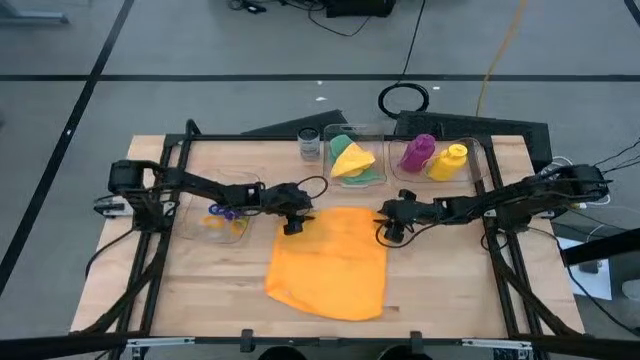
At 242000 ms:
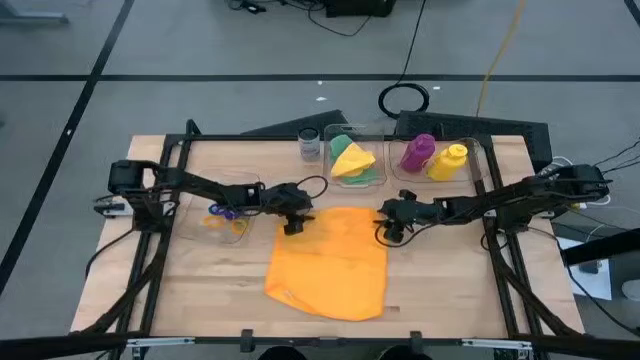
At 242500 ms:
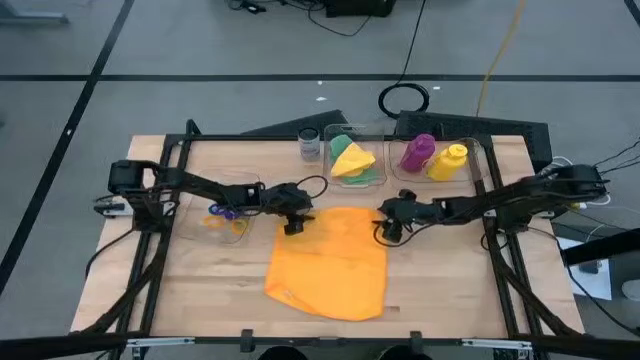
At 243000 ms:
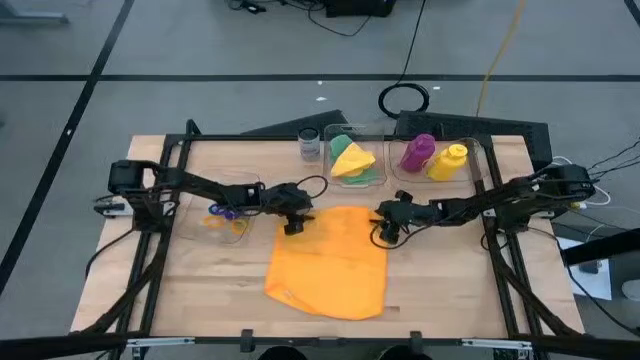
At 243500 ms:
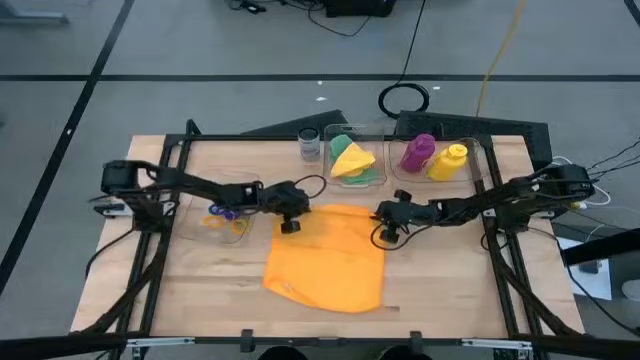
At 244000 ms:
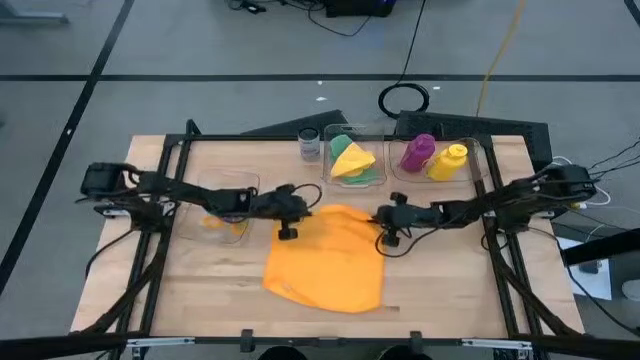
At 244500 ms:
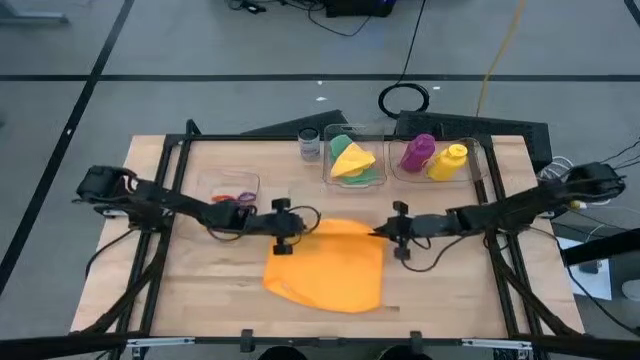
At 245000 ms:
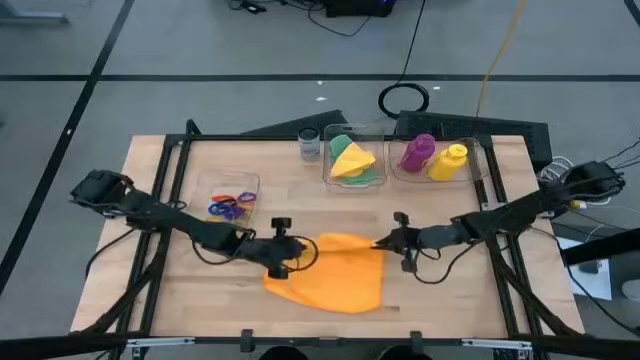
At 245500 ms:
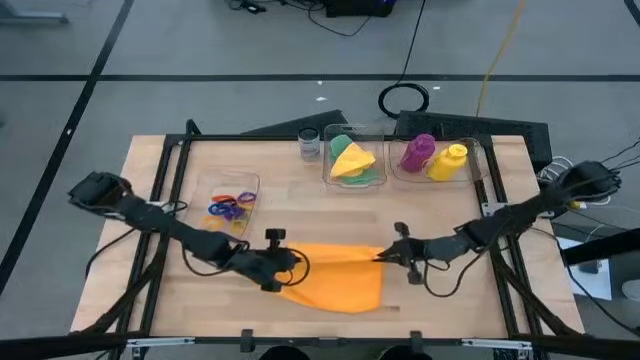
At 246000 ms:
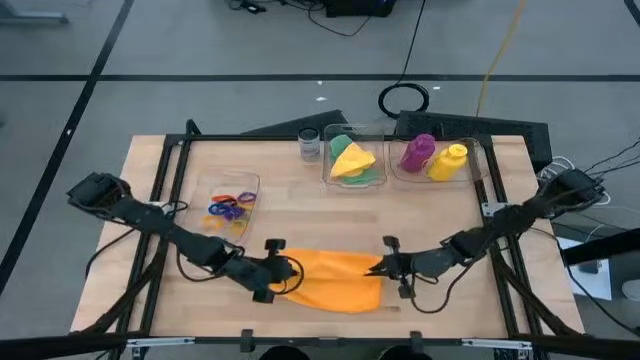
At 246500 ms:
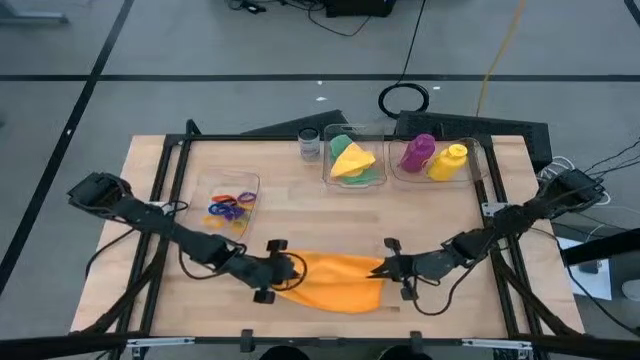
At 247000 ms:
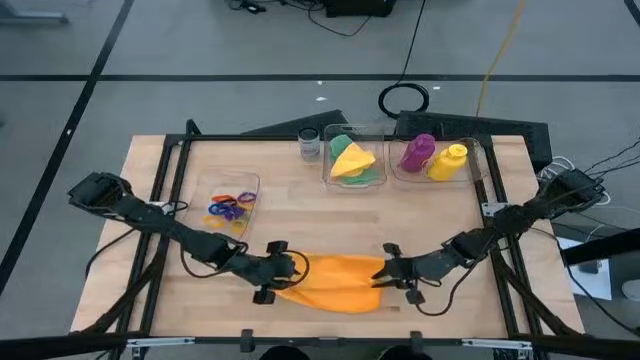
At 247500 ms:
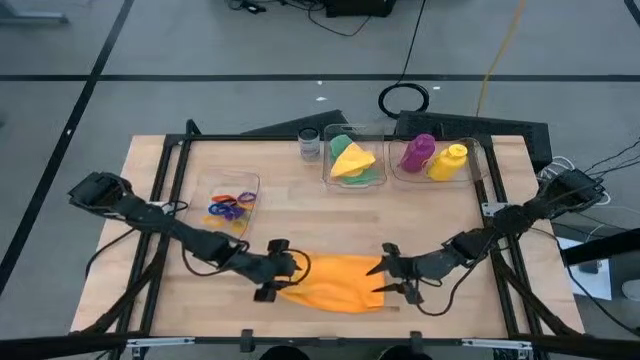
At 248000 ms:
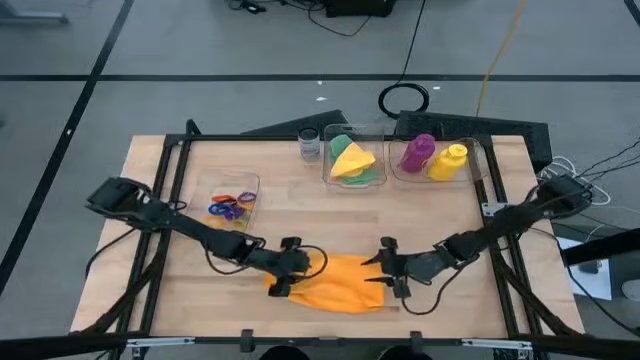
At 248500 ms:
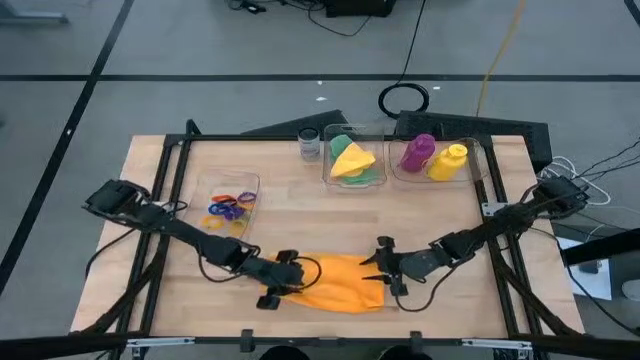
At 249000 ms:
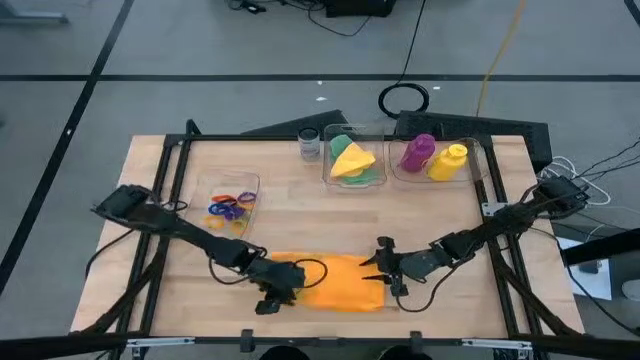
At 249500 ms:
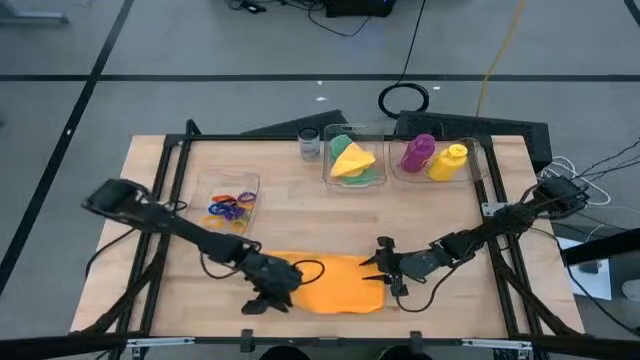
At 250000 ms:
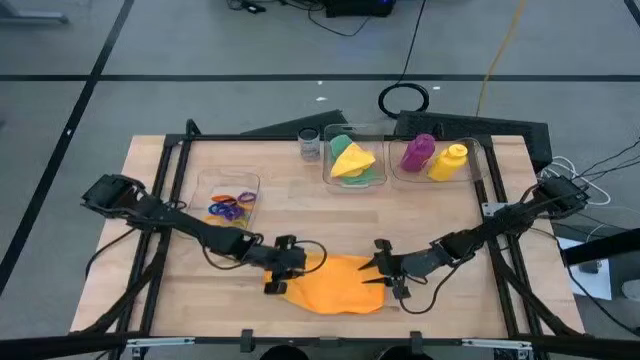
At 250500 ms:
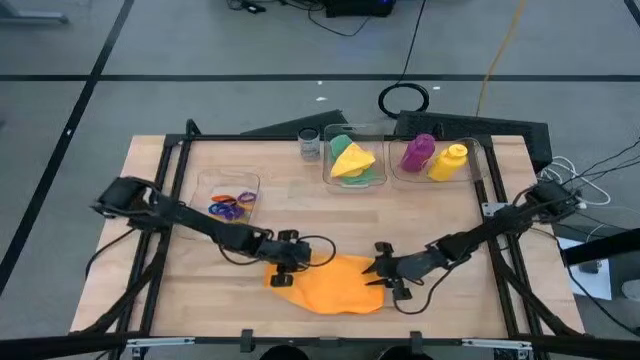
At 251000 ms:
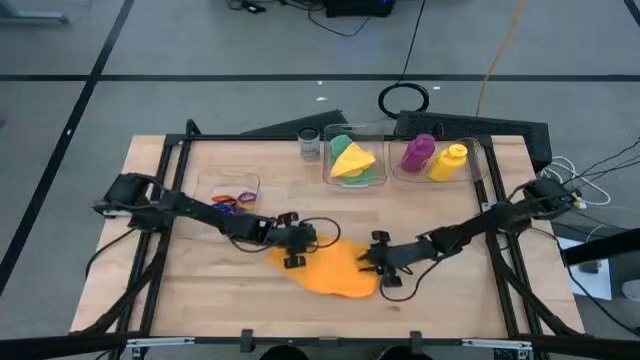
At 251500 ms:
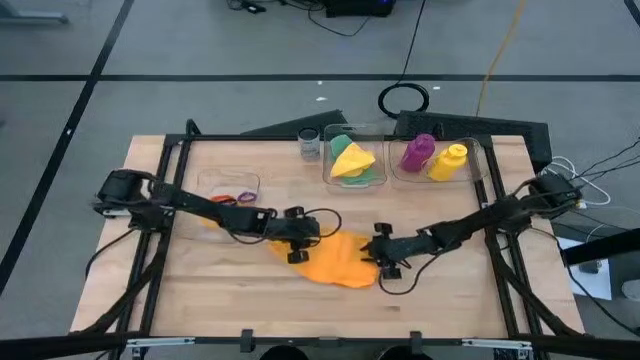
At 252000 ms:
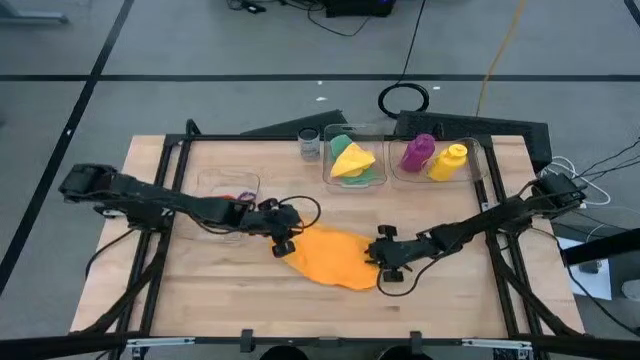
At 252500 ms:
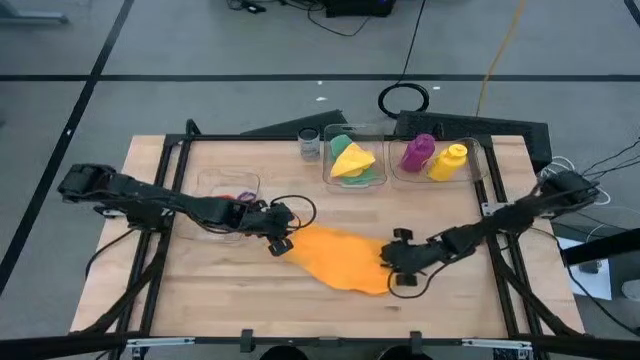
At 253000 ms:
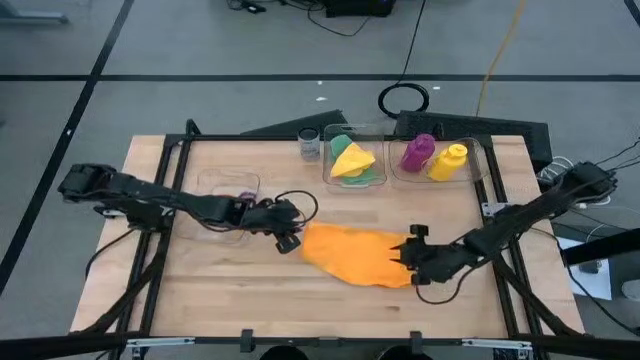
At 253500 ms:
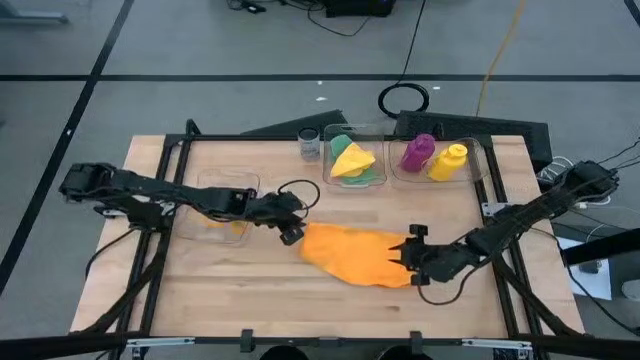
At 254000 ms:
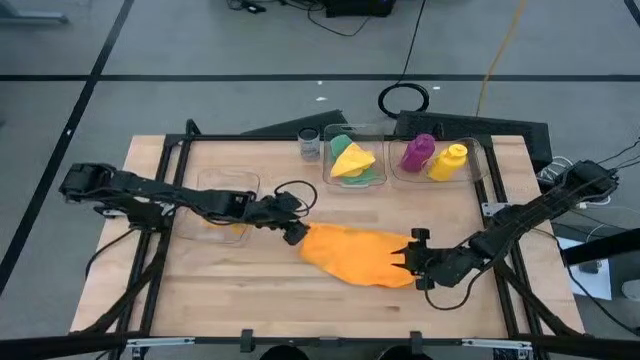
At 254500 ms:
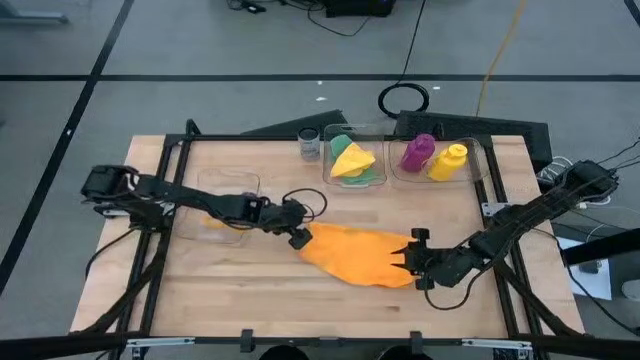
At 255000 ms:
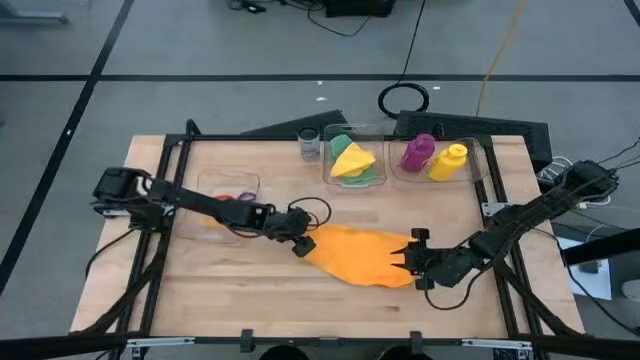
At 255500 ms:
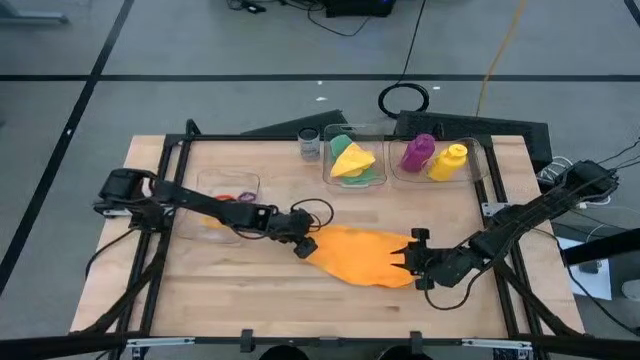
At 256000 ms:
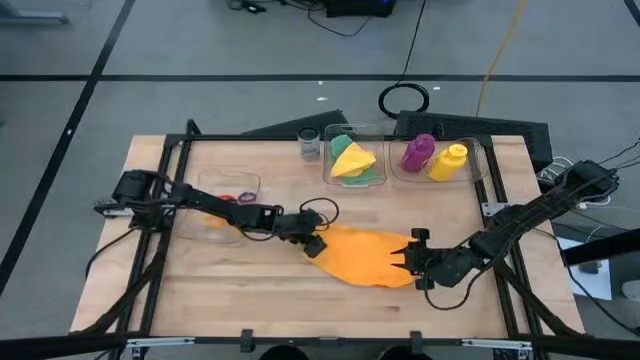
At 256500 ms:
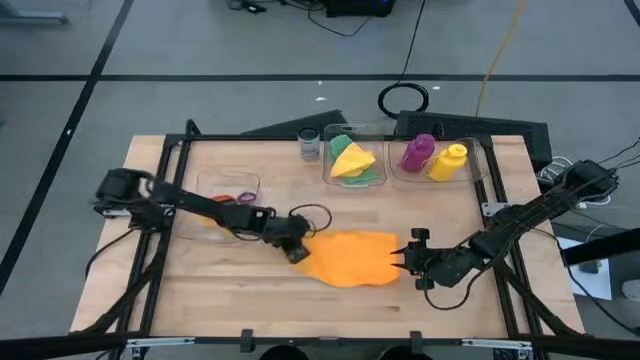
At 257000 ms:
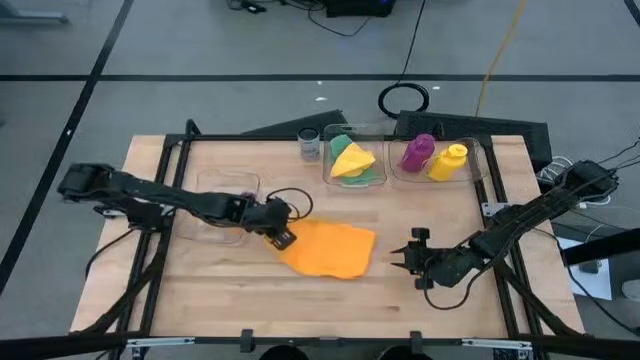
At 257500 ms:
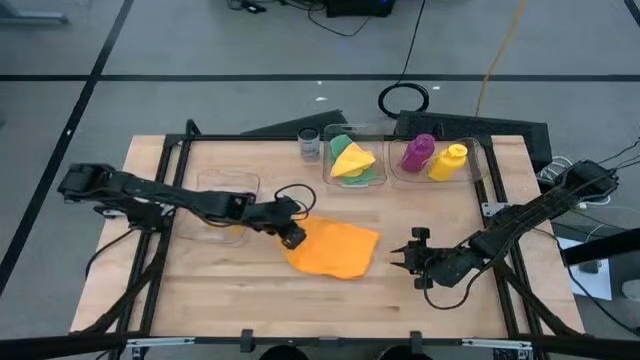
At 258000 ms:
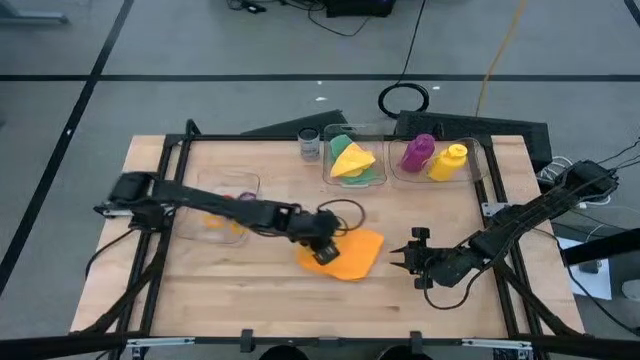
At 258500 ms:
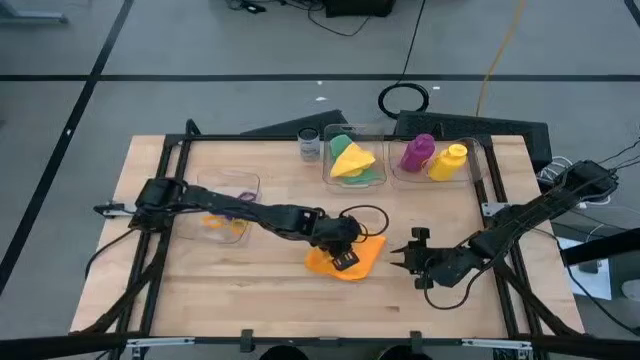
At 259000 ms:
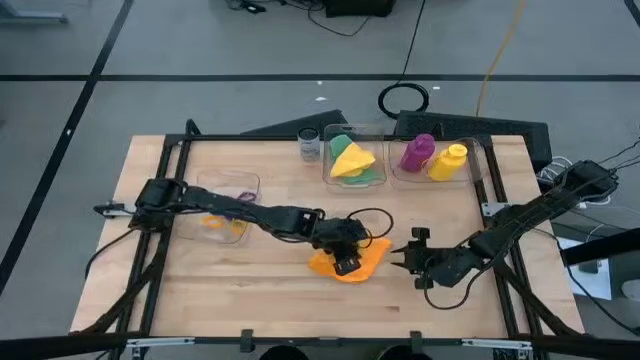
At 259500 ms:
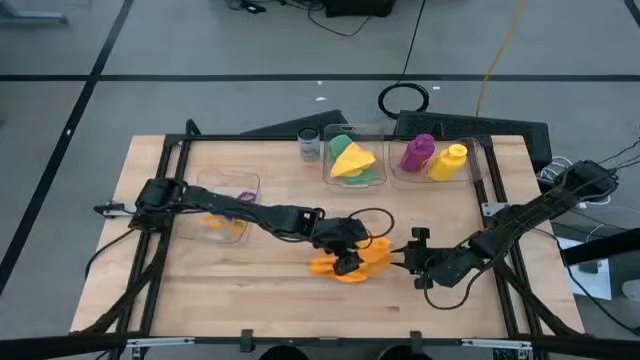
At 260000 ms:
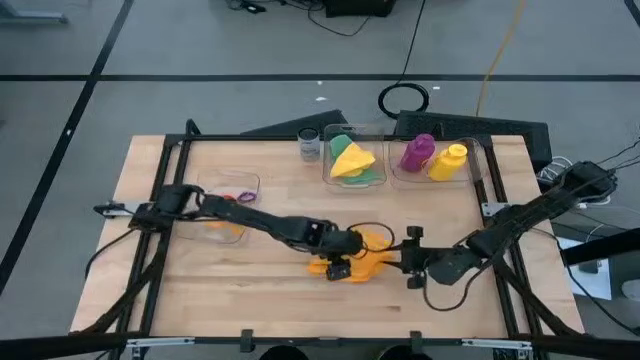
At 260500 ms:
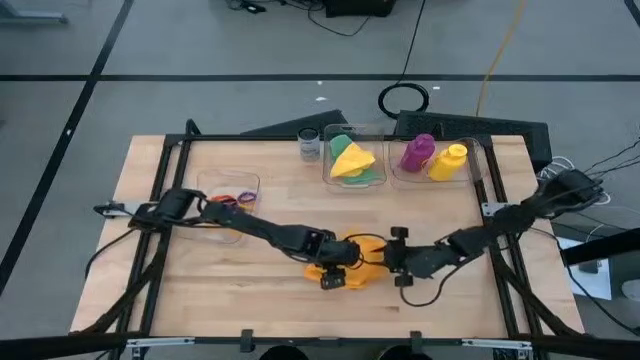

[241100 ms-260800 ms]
Task: Pick & Place Sports Items
Fold the orange towel
